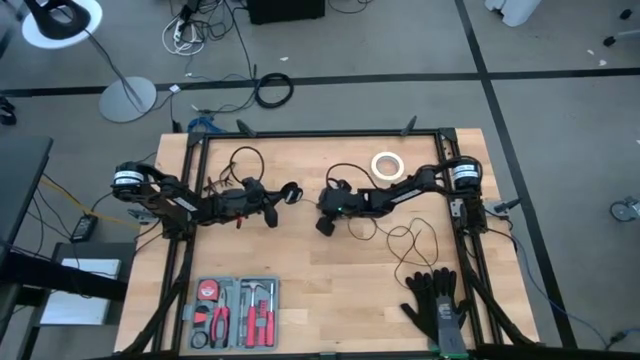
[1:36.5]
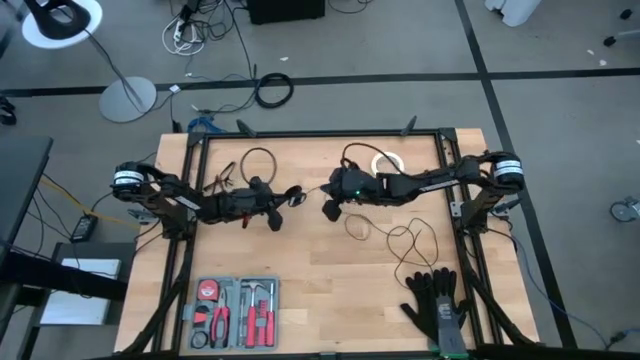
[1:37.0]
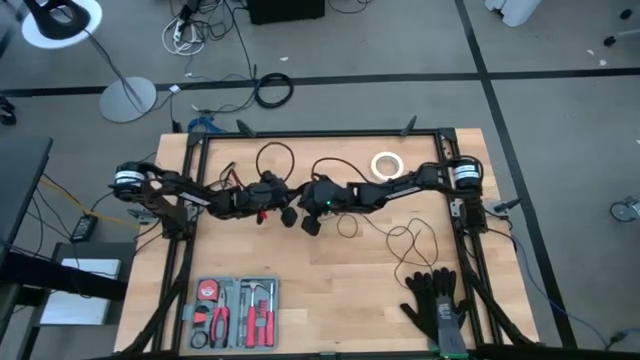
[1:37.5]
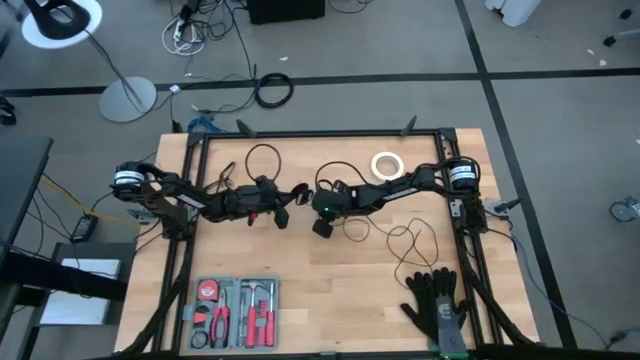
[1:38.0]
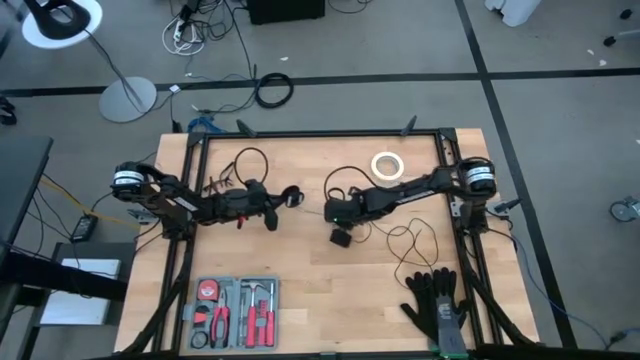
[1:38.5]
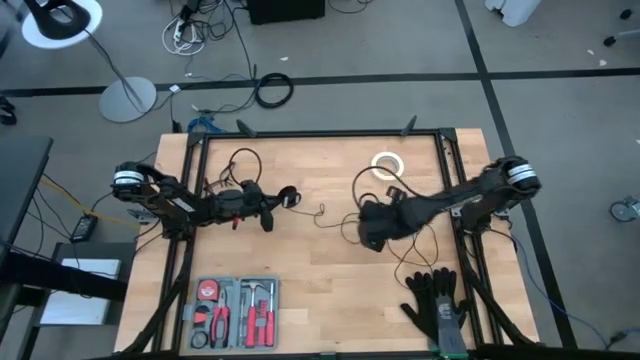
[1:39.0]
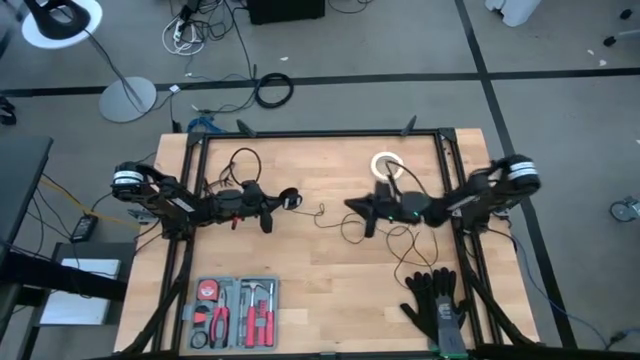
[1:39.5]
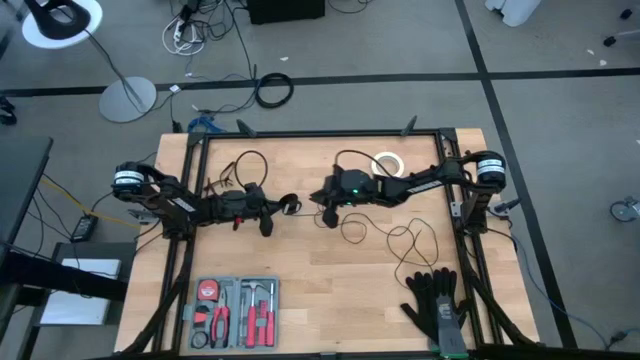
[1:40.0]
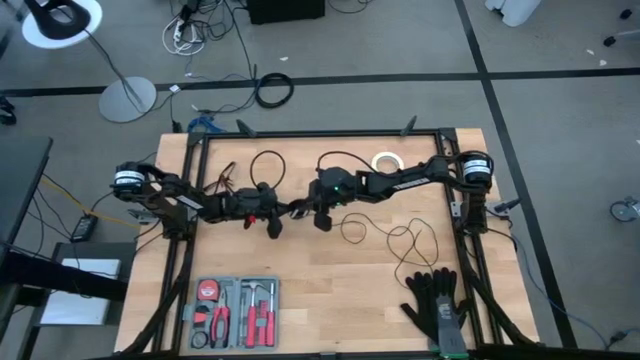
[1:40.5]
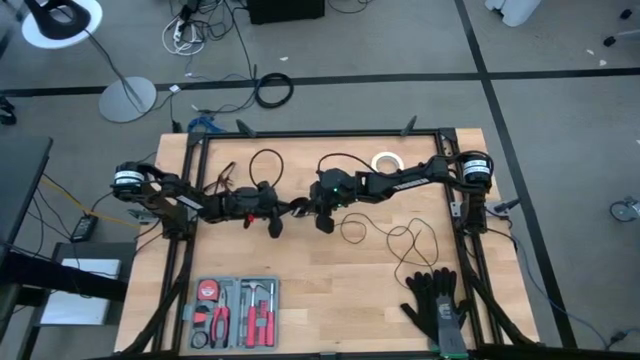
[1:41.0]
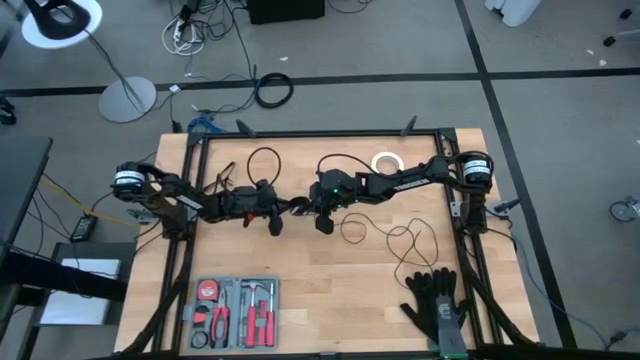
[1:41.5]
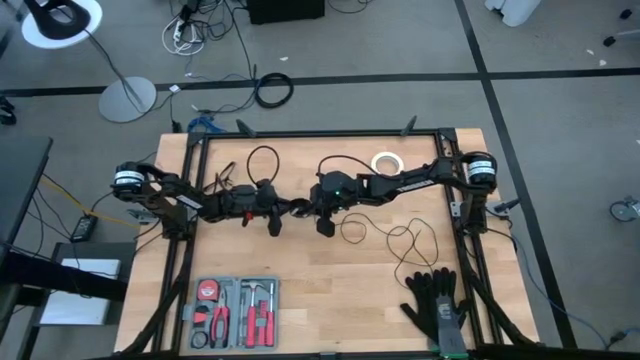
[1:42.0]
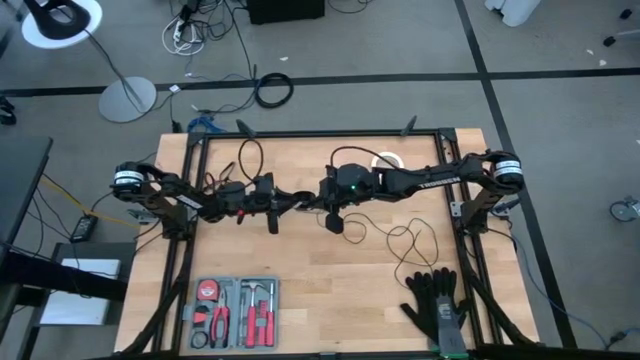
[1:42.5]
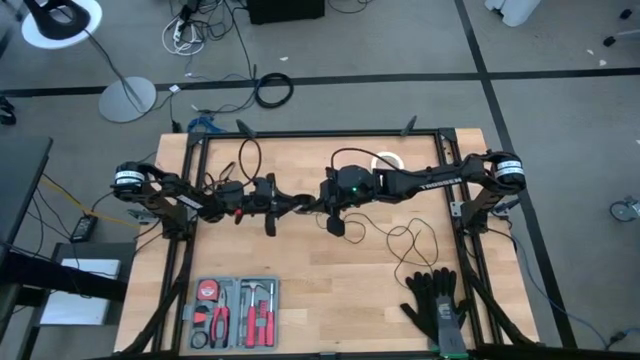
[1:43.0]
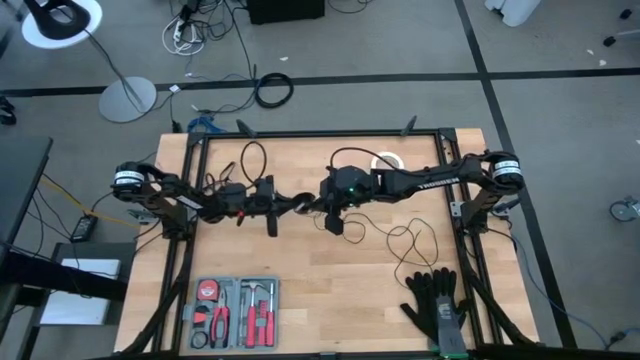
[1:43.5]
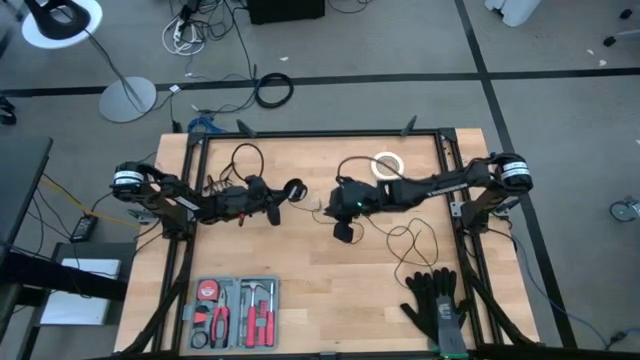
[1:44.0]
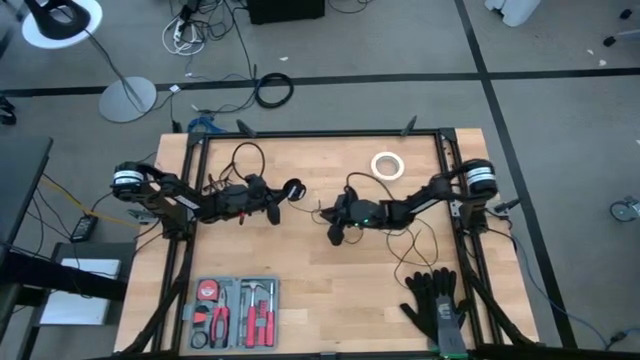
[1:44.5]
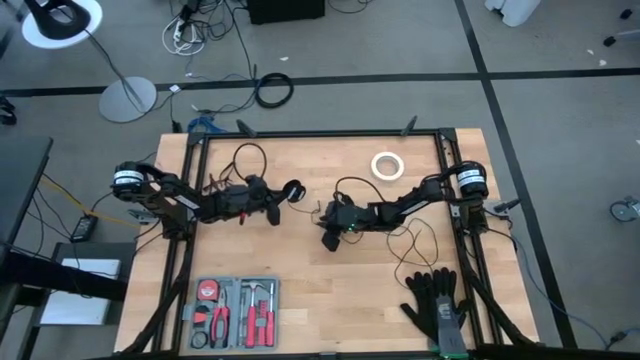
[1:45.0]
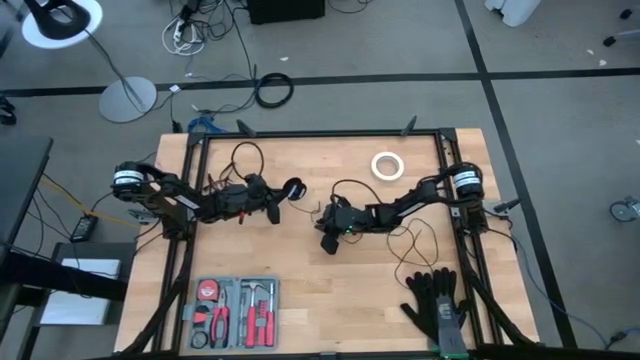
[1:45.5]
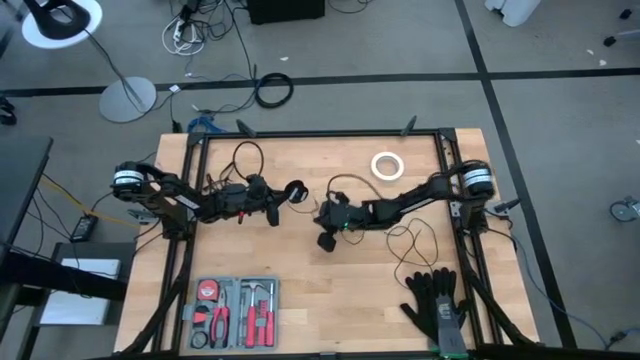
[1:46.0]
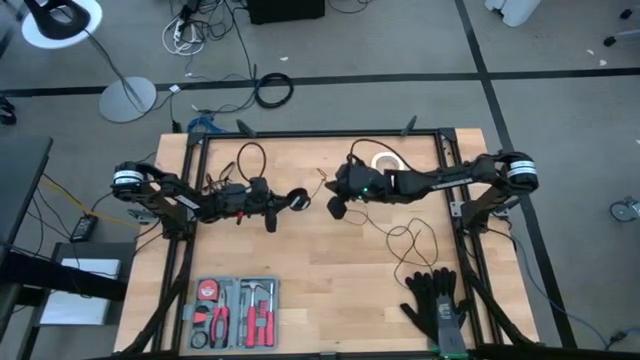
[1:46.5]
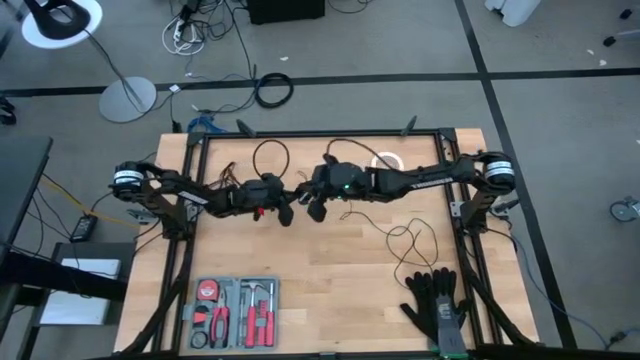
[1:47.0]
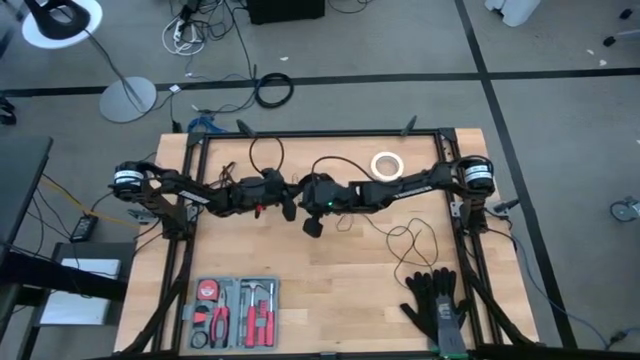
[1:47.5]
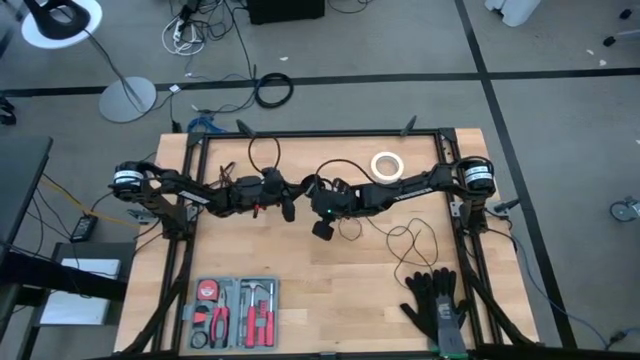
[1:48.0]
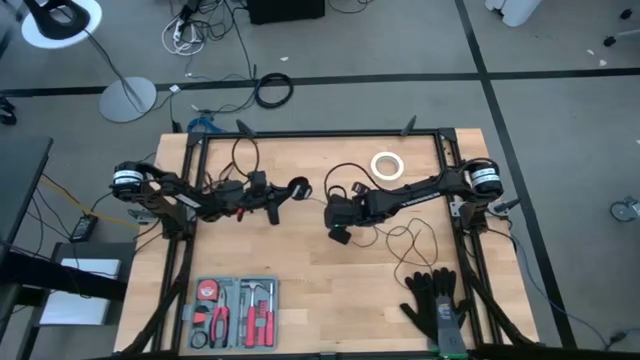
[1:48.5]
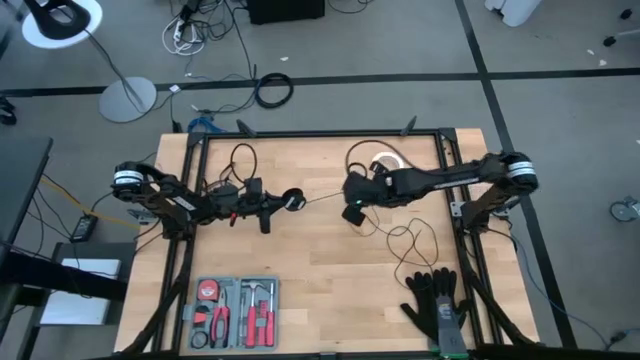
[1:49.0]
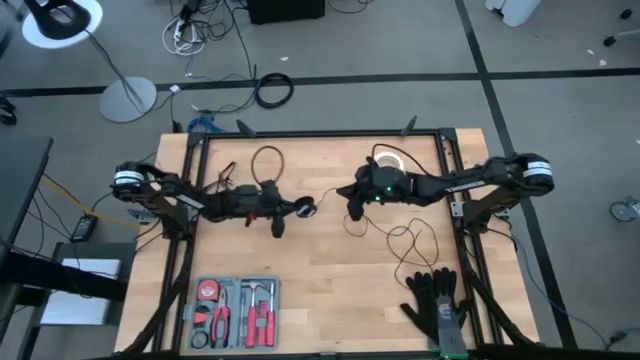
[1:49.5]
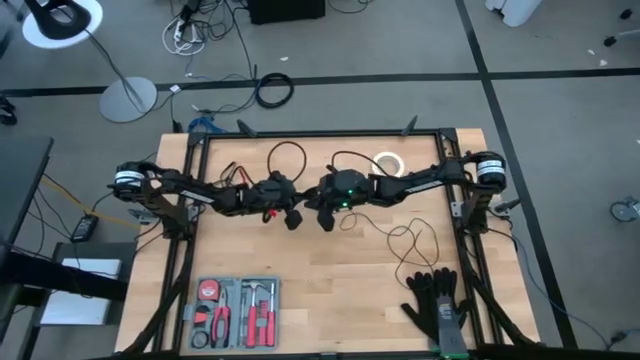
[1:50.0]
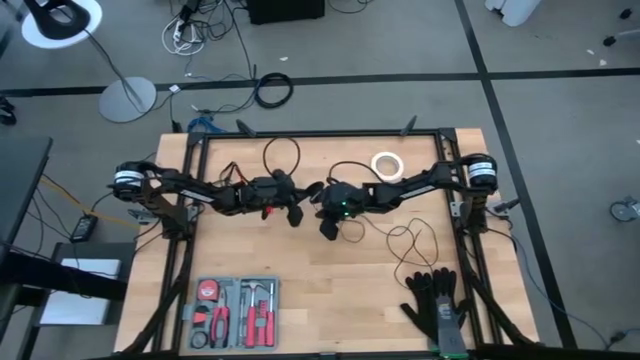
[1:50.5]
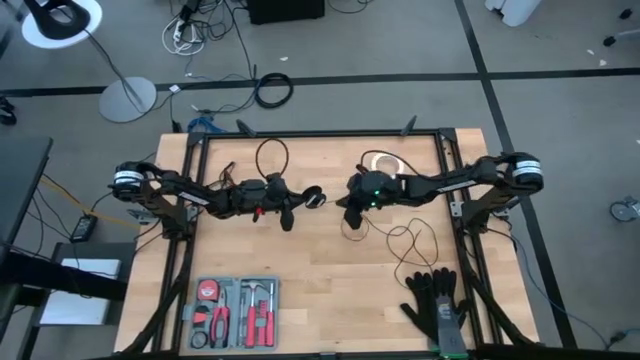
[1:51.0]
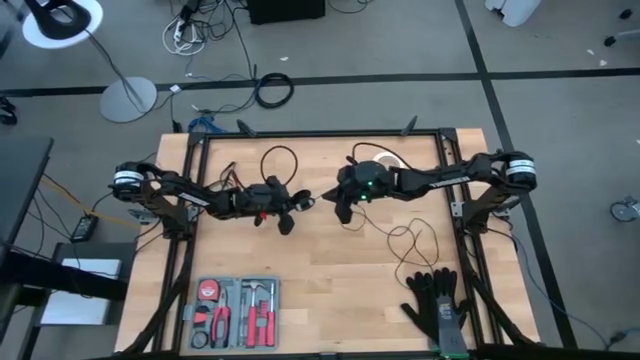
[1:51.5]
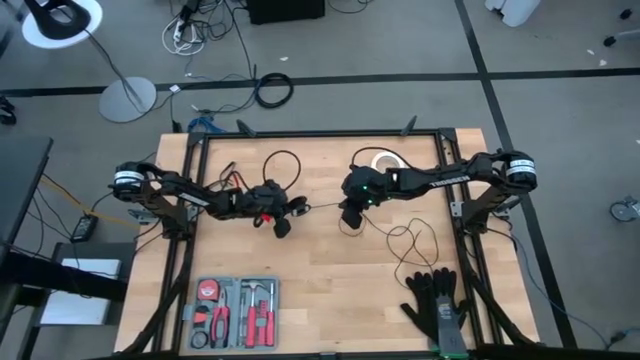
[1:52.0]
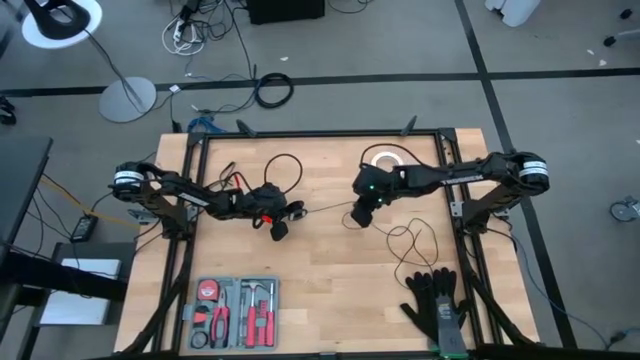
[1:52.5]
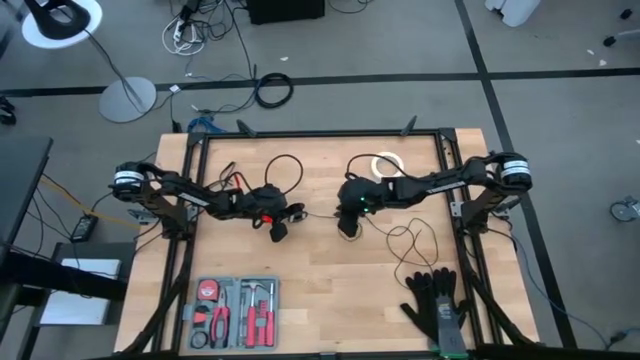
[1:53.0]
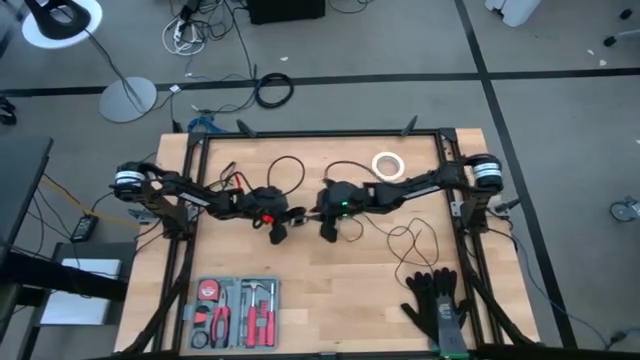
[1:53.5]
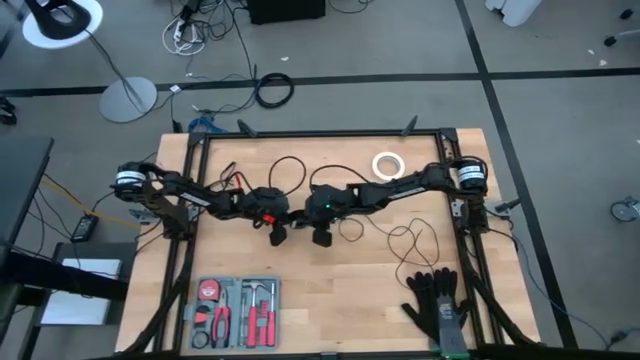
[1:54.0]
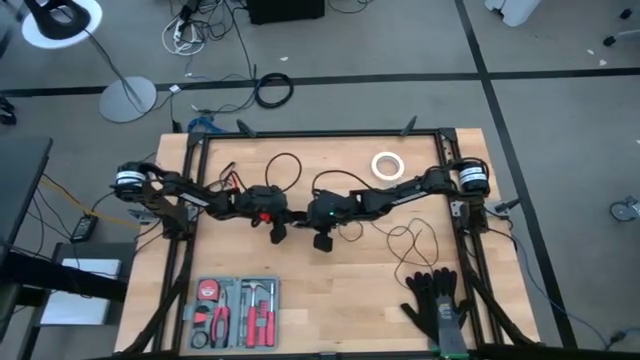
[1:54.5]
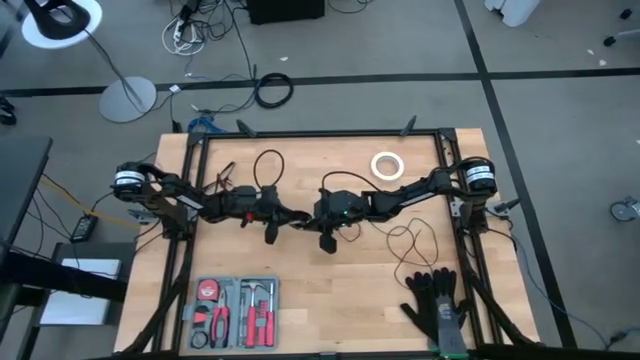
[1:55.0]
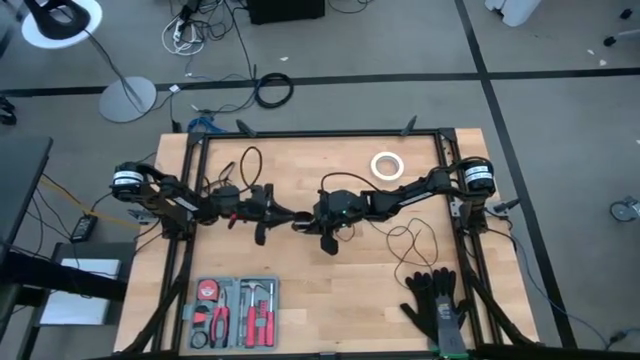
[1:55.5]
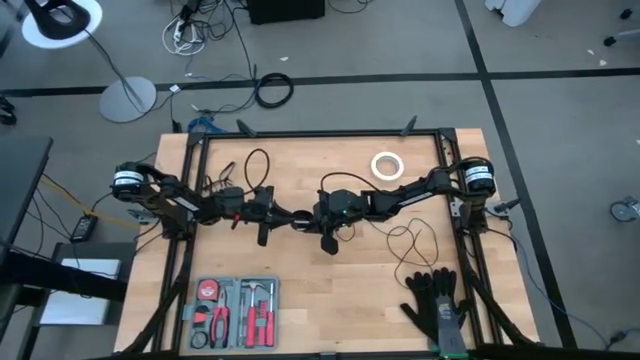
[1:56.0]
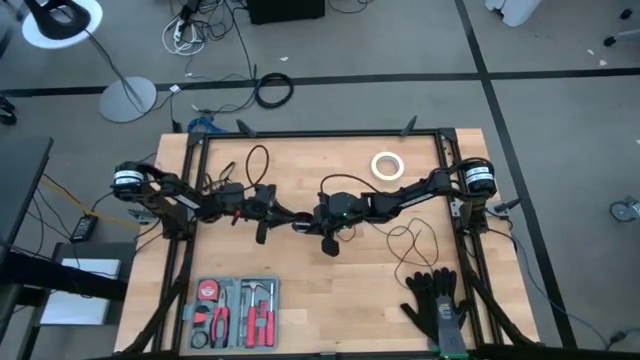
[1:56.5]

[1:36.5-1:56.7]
Task: Coil cords
Coil the black wire on the black spool

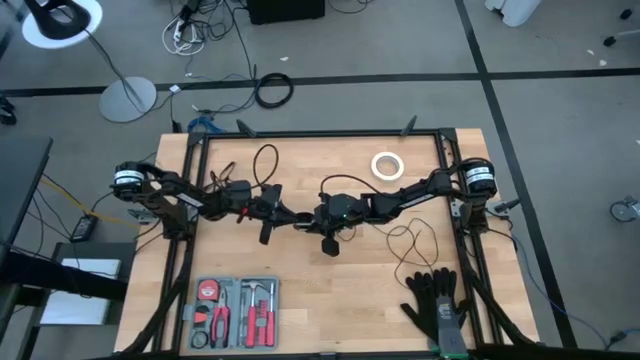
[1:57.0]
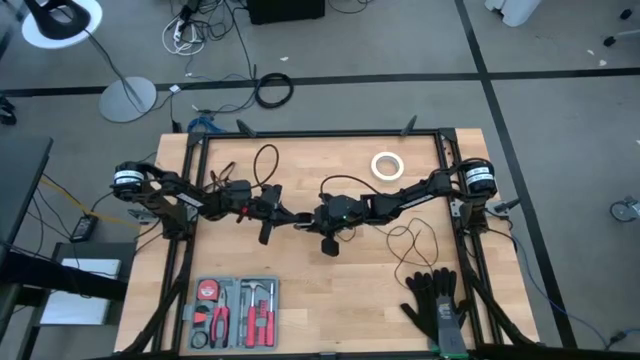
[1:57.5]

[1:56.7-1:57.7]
Coil the black wire on the black spool
